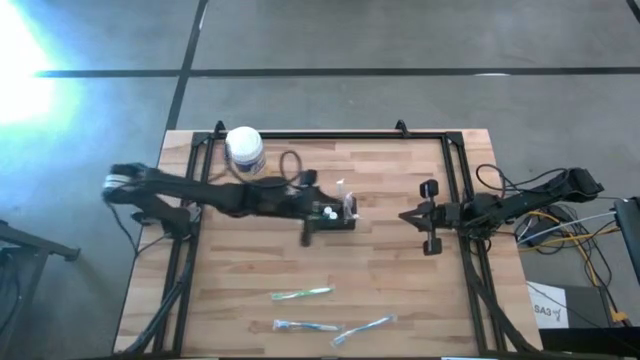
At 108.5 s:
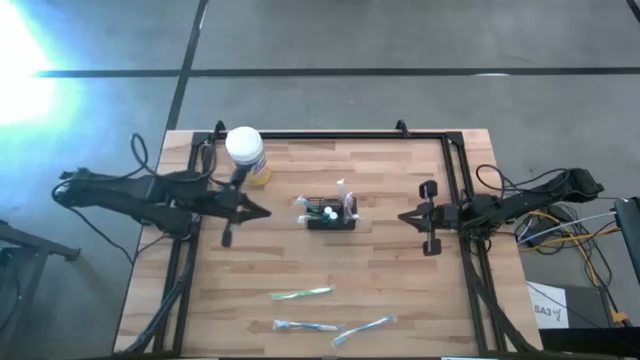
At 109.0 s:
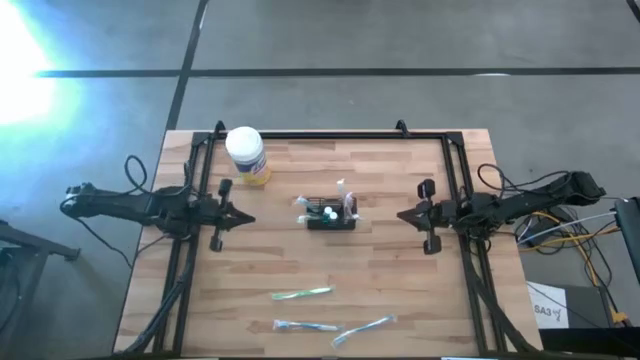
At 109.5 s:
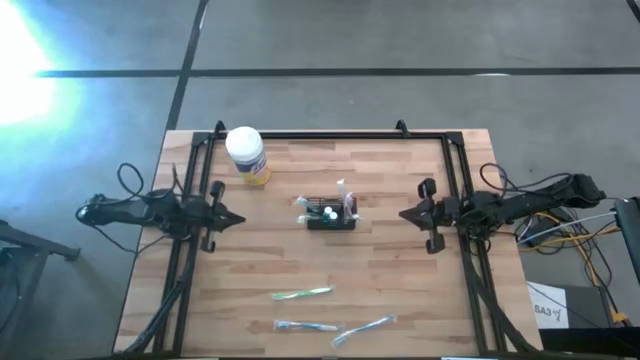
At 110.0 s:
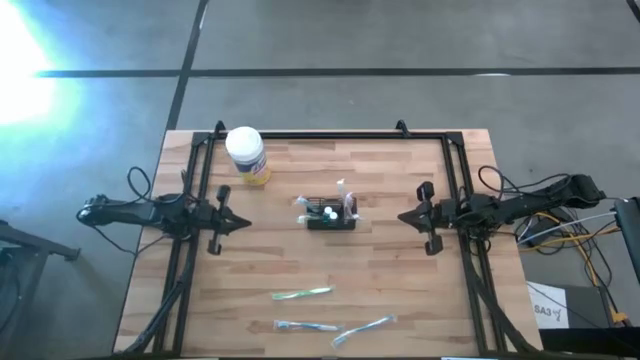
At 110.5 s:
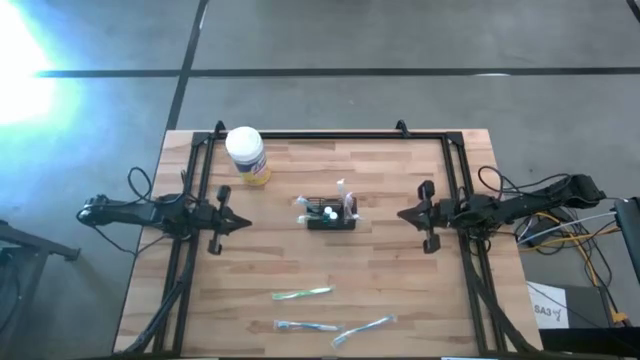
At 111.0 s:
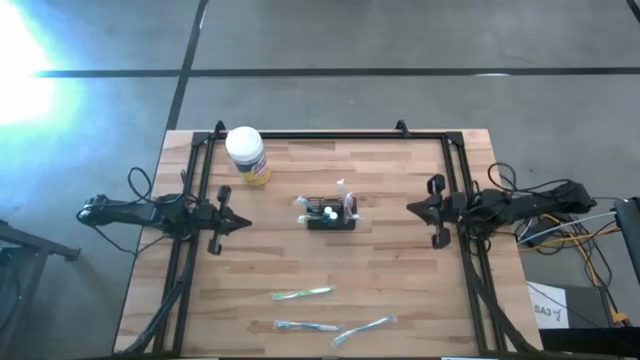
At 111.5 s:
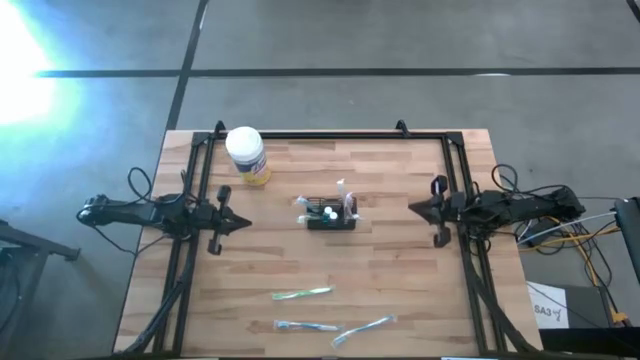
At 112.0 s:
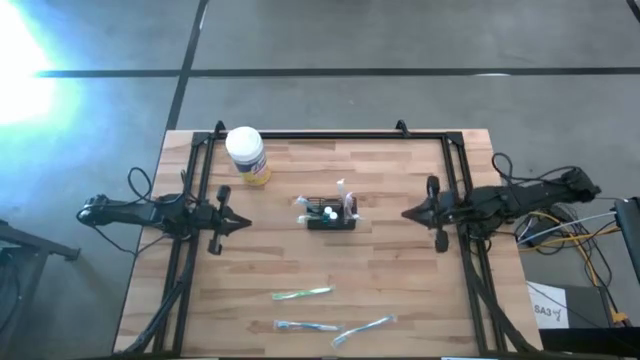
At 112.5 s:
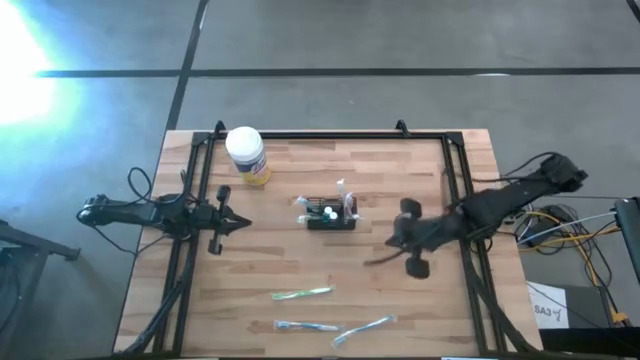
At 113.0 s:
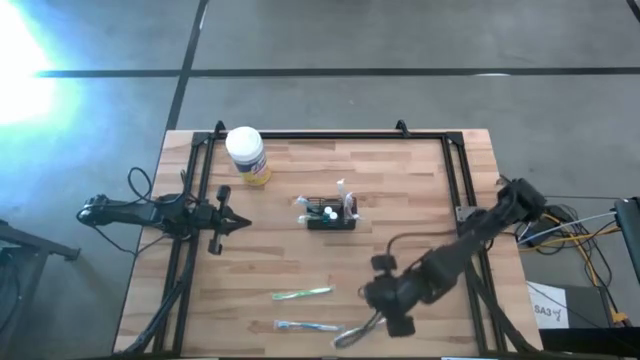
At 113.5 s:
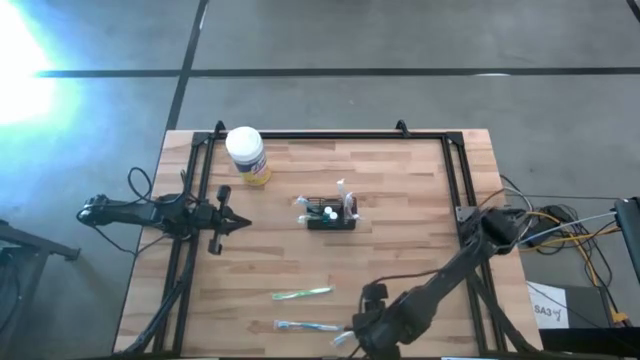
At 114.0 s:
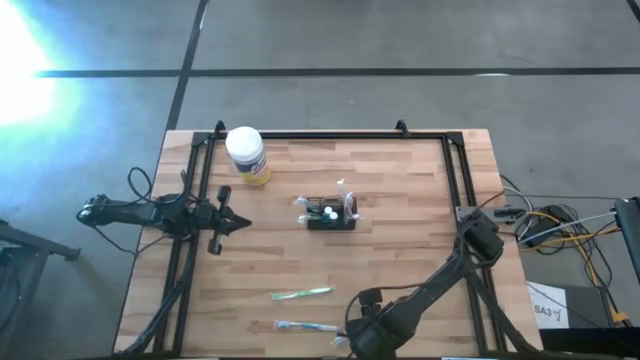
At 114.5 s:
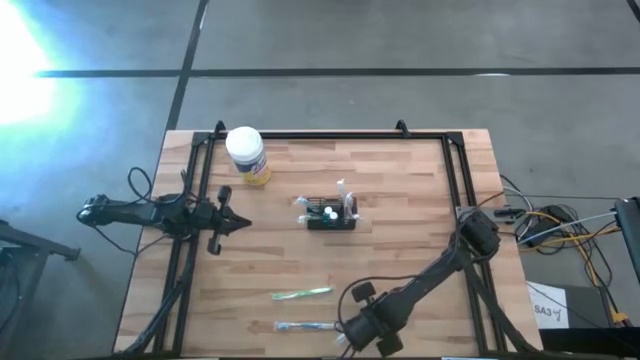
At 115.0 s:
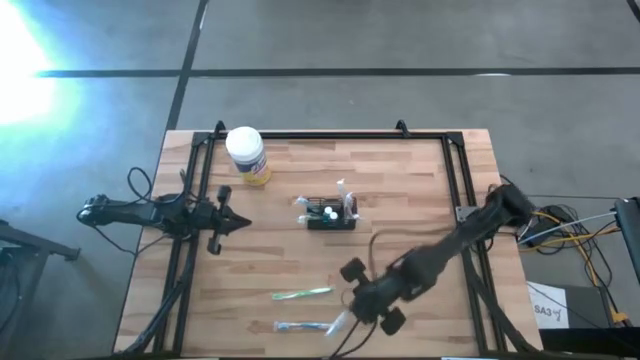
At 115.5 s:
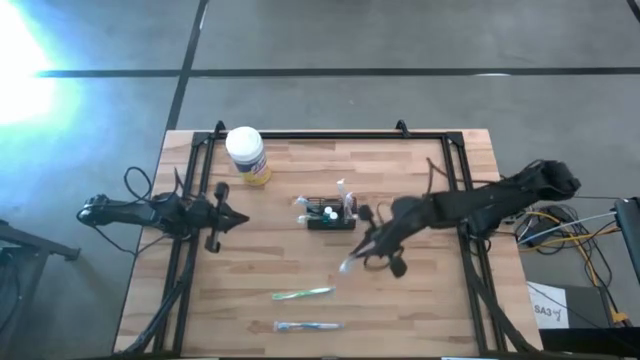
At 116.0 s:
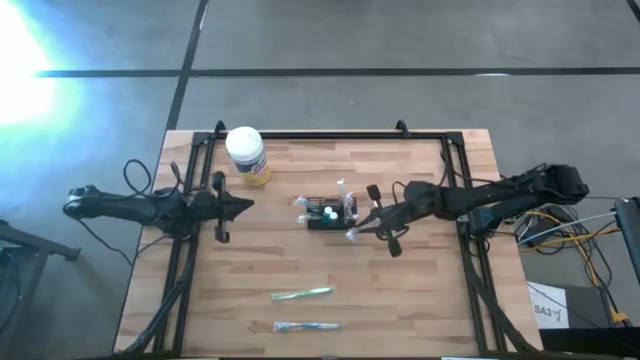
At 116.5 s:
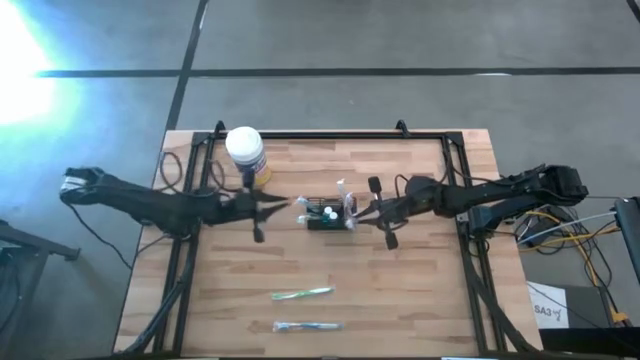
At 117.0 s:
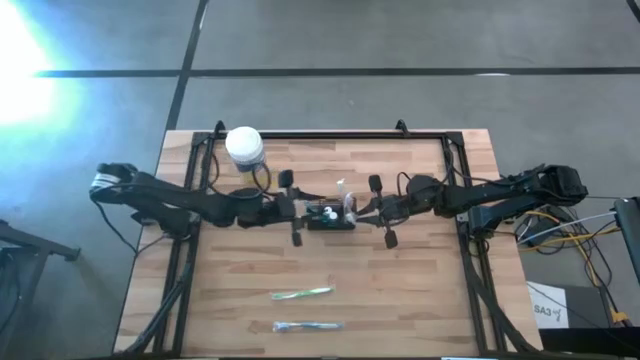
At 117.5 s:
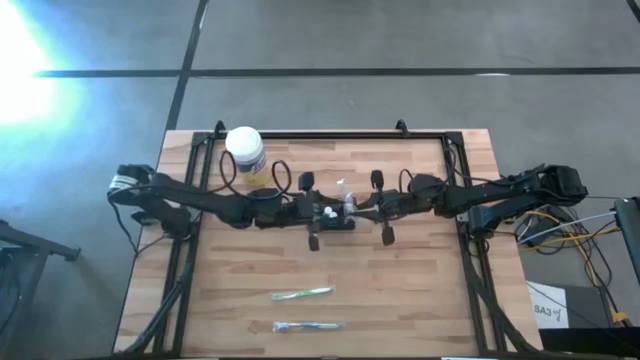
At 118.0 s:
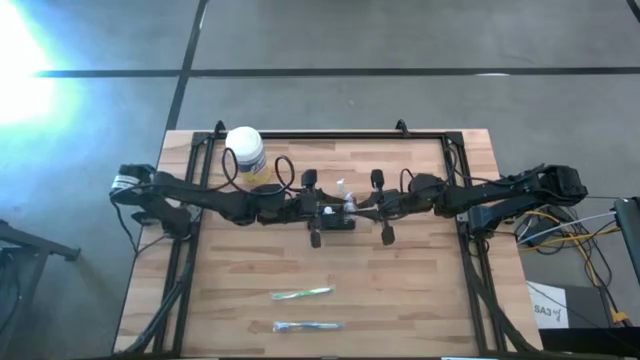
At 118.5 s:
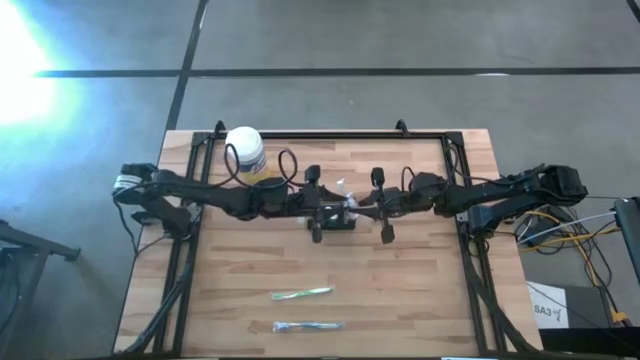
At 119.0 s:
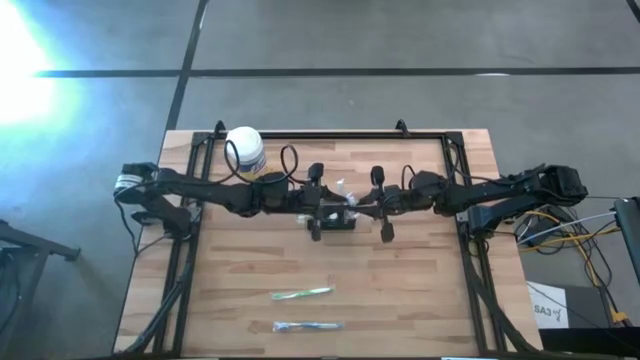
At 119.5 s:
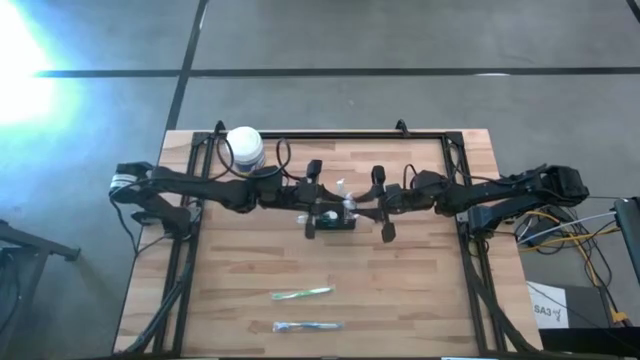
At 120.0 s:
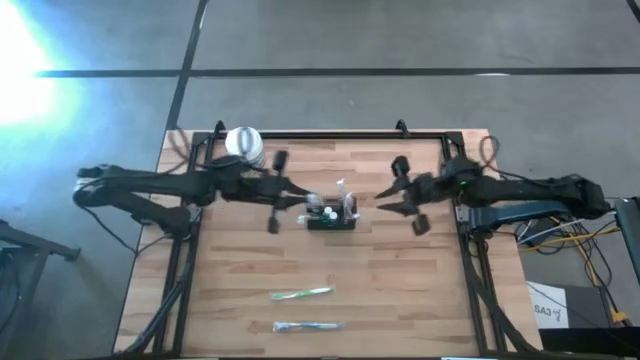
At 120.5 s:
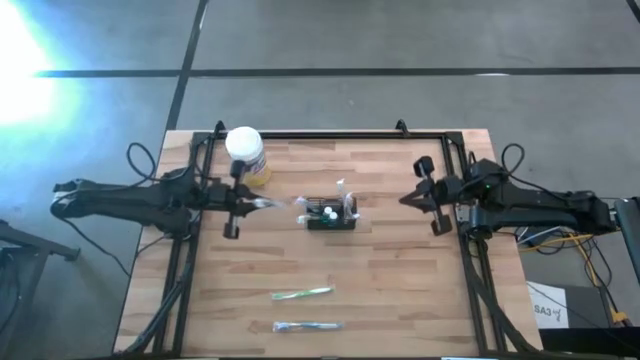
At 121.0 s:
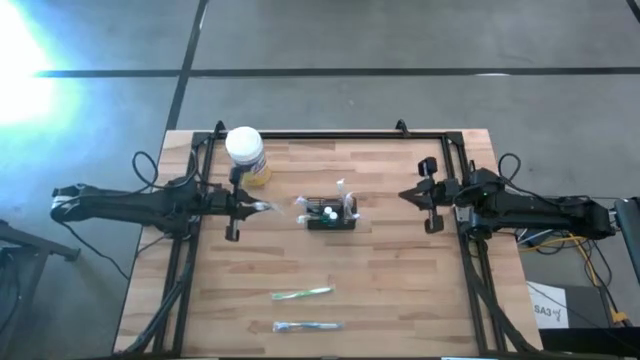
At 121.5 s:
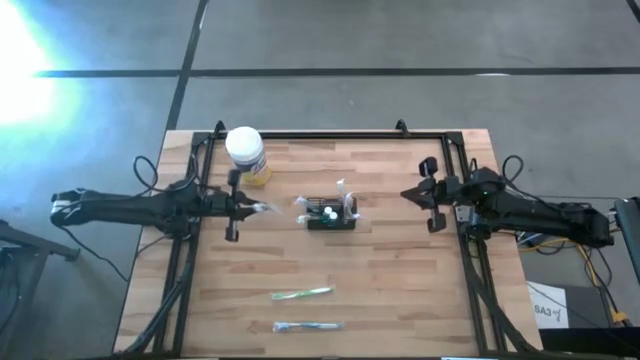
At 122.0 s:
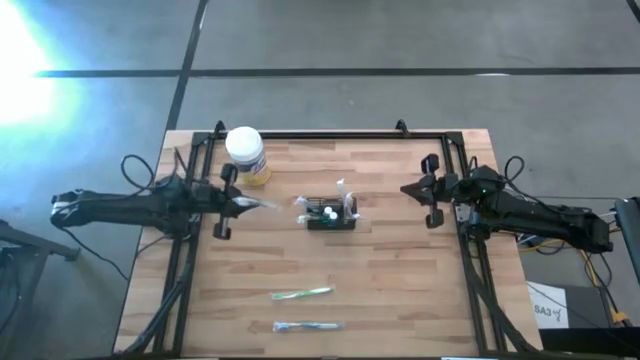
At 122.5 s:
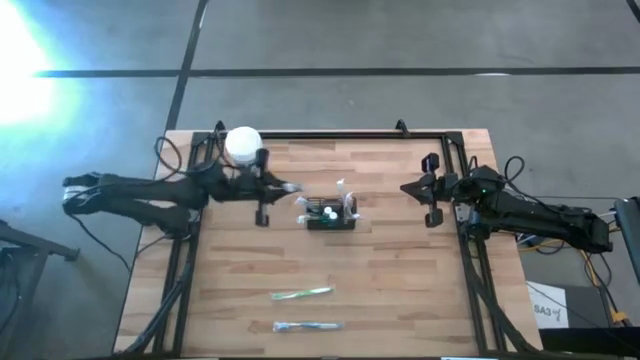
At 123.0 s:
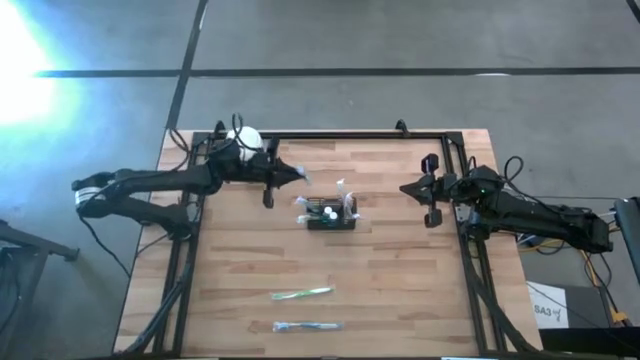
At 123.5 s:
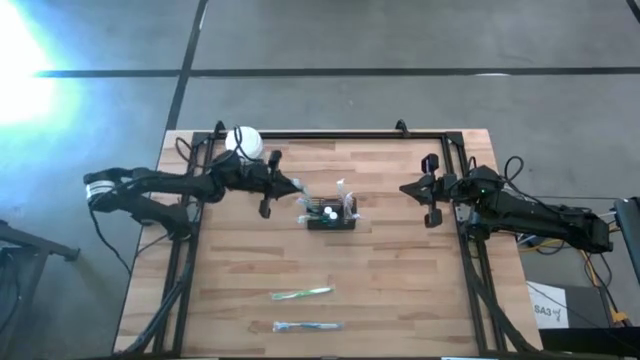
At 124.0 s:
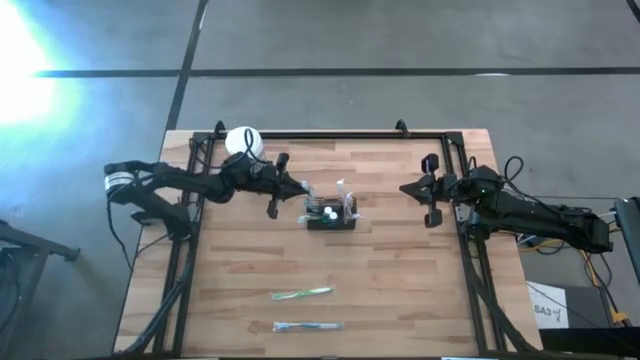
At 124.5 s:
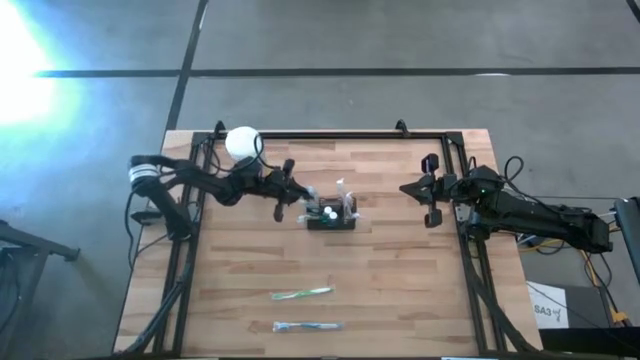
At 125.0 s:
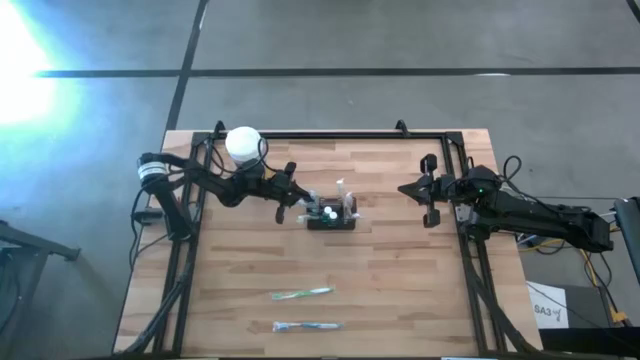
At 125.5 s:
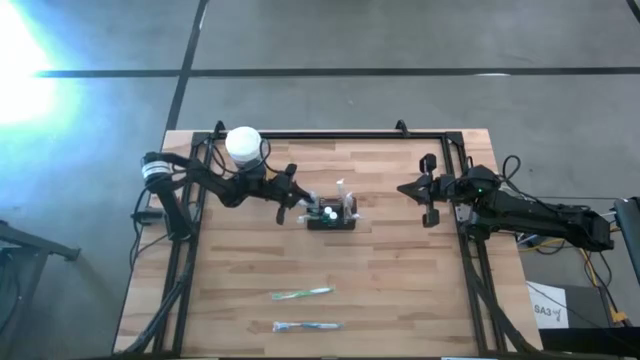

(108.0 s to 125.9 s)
Task: Pick & Place toothbrushing station
Put the bottom blue toothbrush into the black wire organizer

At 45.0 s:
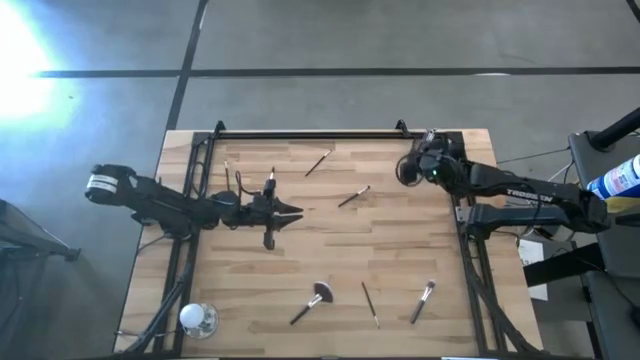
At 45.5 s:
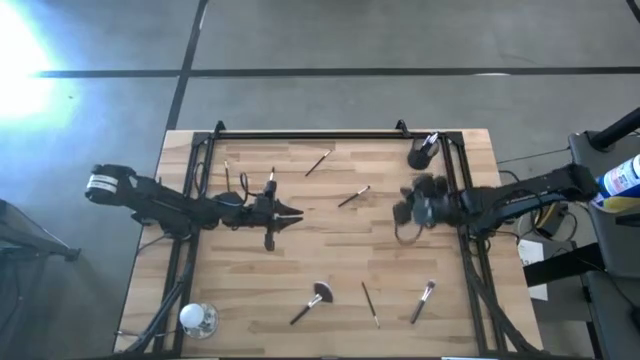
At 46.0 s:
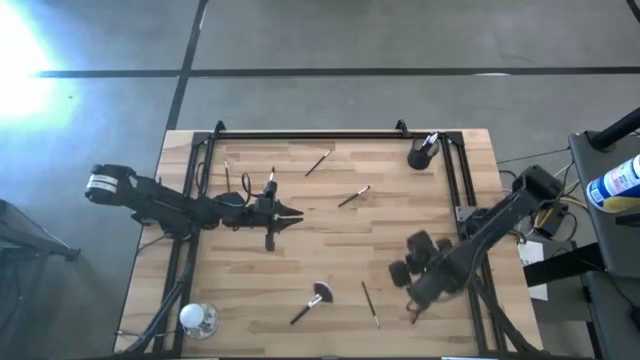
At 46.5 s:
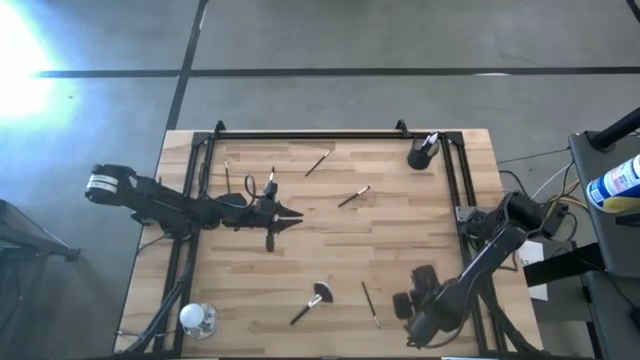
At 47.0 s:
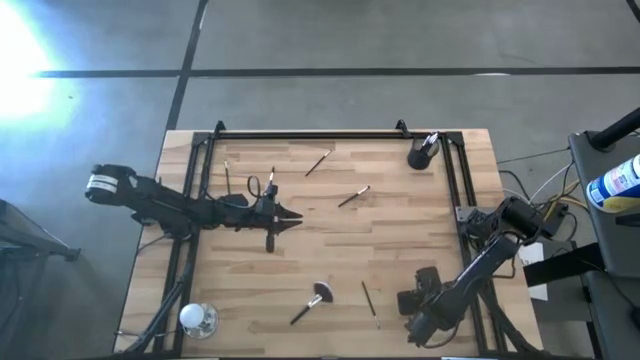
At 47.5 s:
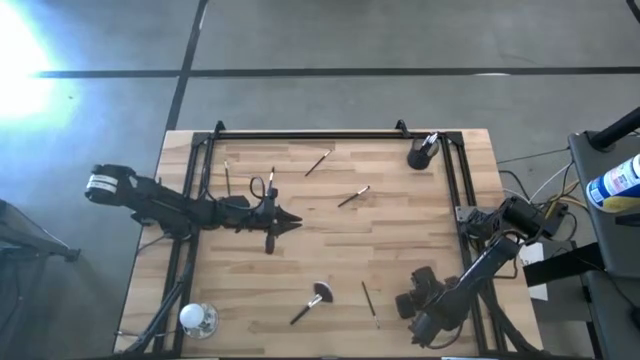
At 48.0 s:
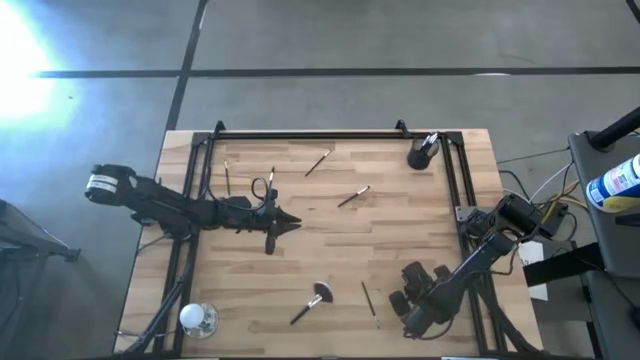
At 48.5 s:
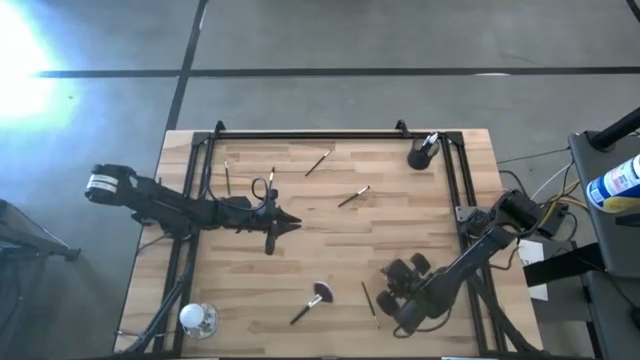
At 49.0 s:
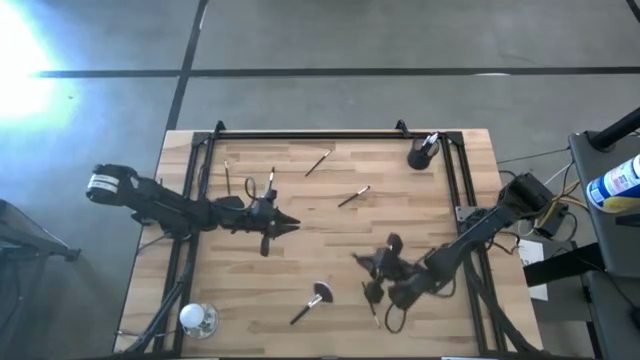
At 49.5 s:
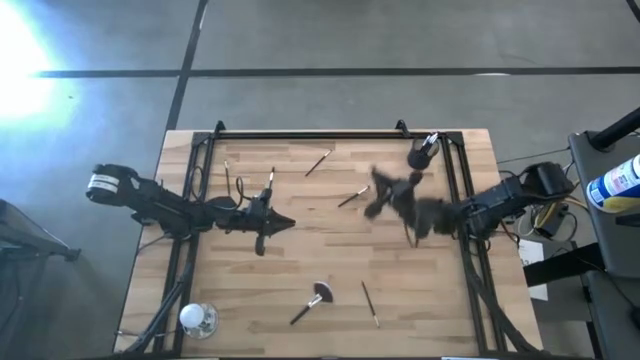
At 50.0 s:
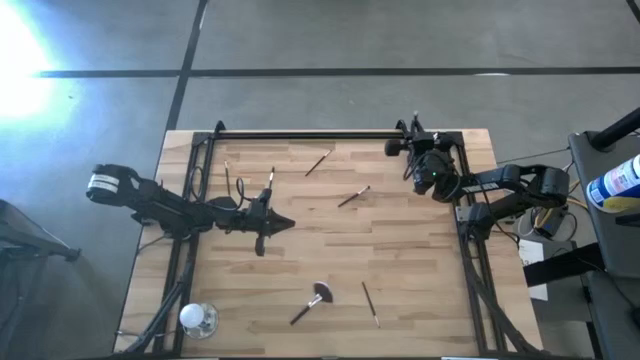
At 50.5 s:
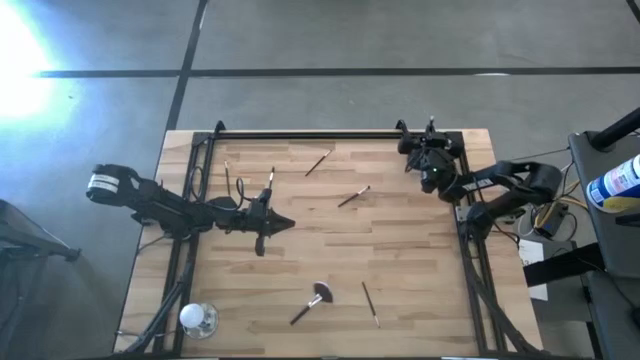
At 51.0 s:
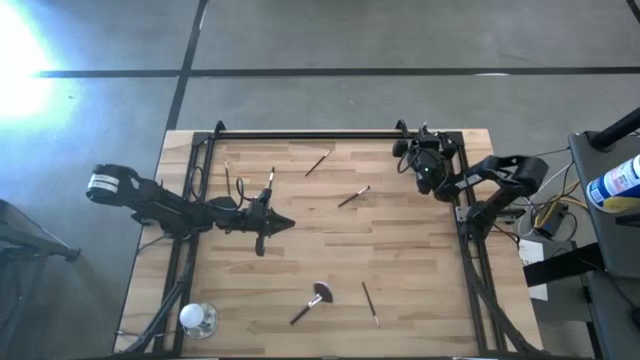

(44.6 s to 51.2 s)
Task: Put items in baskets/containers
Put the foundation brush into the pen holder
